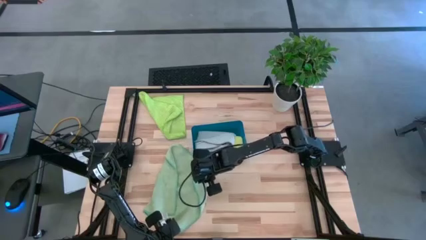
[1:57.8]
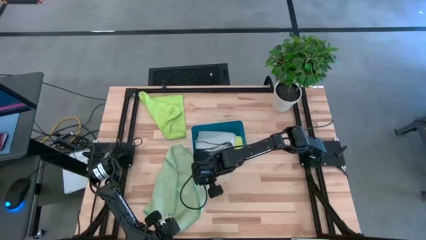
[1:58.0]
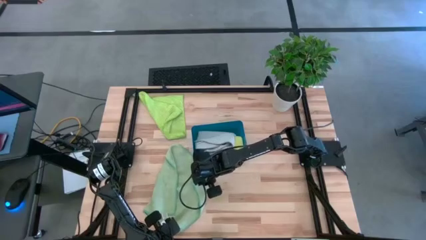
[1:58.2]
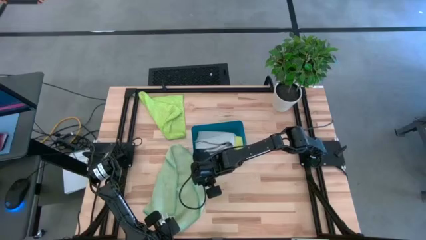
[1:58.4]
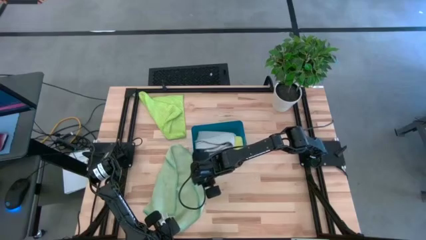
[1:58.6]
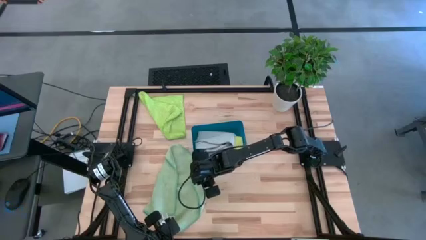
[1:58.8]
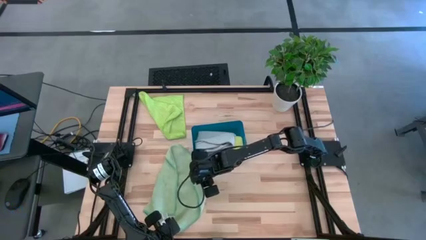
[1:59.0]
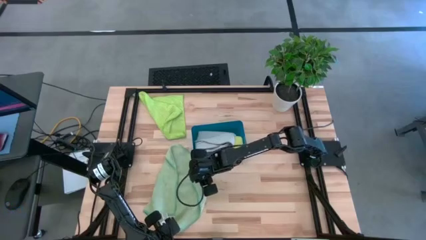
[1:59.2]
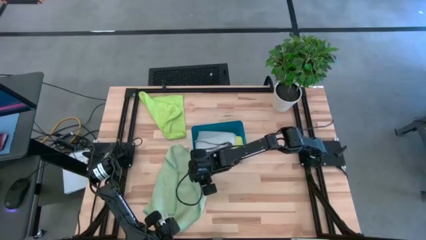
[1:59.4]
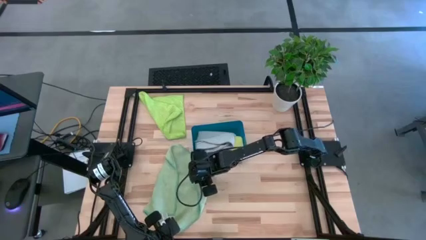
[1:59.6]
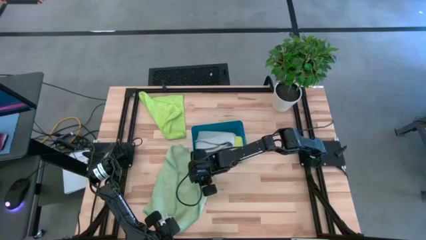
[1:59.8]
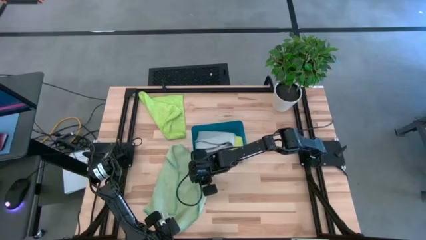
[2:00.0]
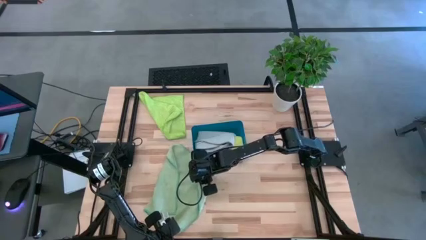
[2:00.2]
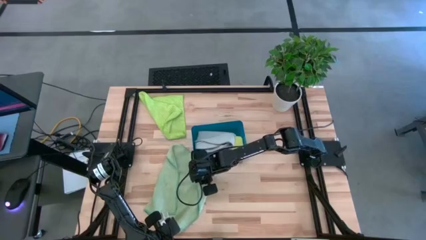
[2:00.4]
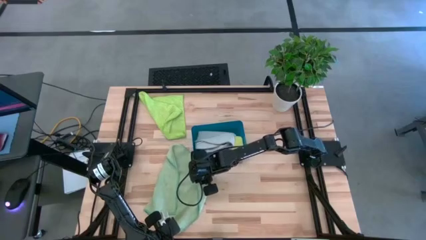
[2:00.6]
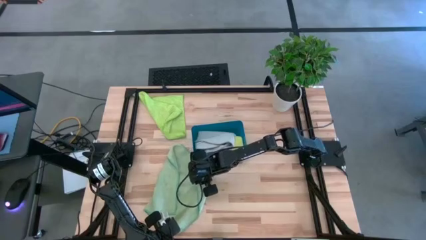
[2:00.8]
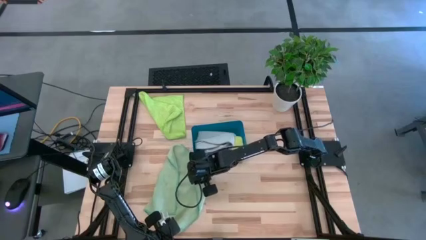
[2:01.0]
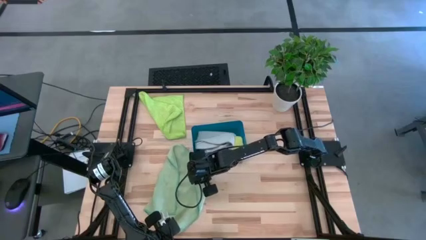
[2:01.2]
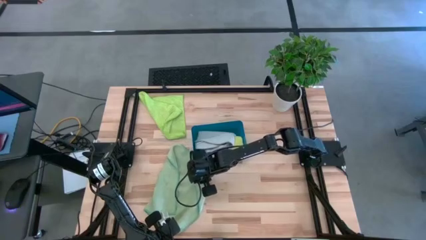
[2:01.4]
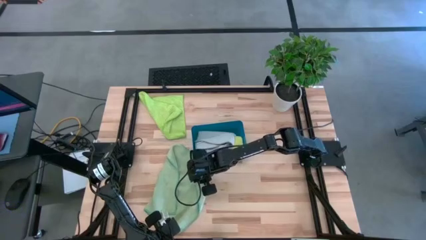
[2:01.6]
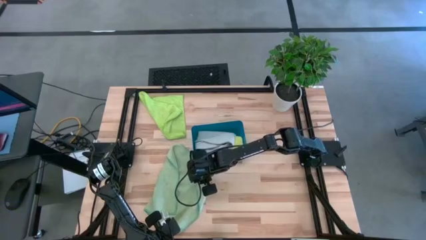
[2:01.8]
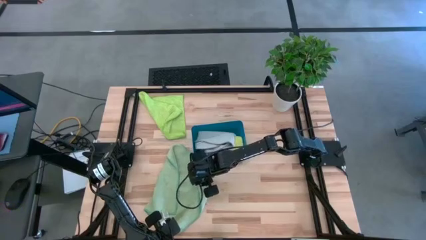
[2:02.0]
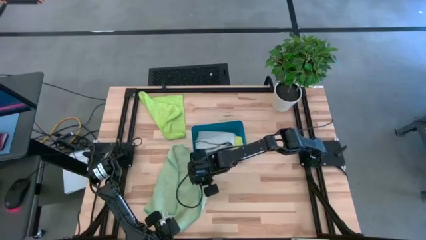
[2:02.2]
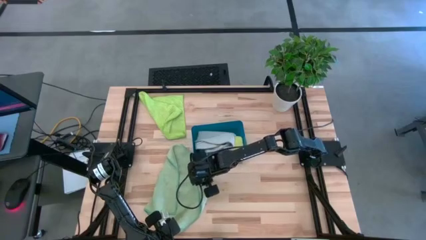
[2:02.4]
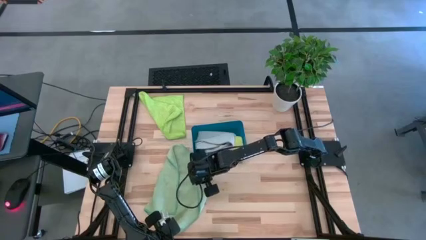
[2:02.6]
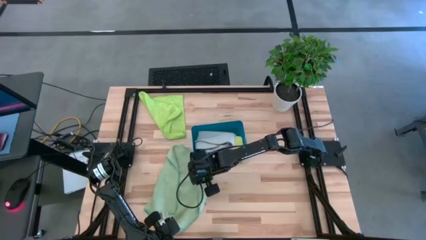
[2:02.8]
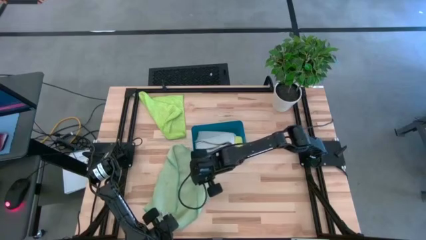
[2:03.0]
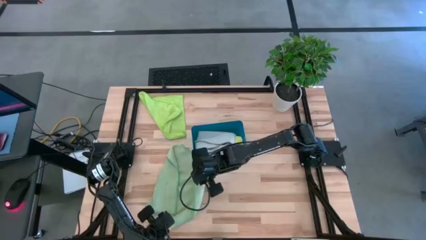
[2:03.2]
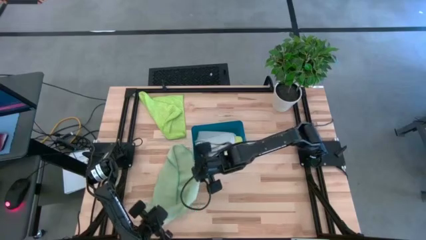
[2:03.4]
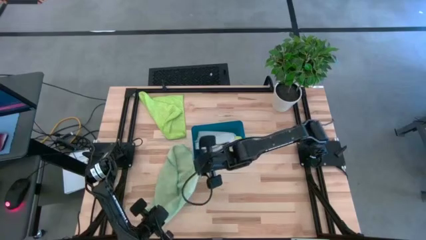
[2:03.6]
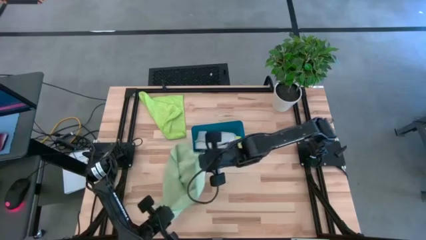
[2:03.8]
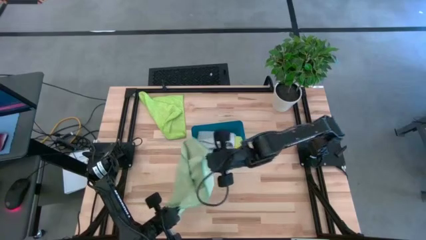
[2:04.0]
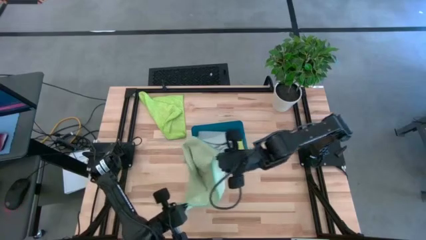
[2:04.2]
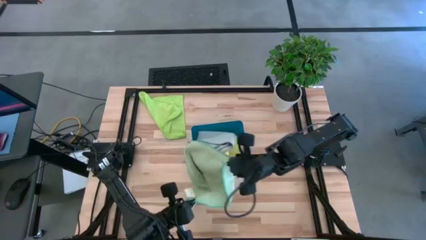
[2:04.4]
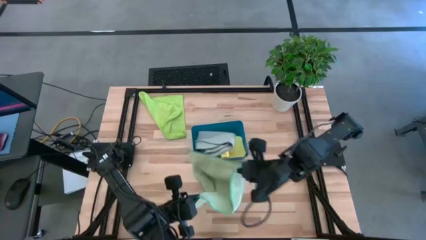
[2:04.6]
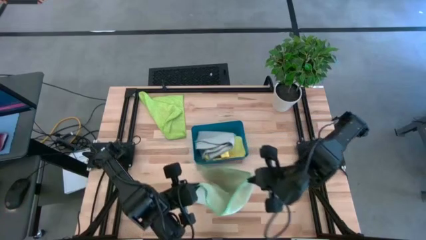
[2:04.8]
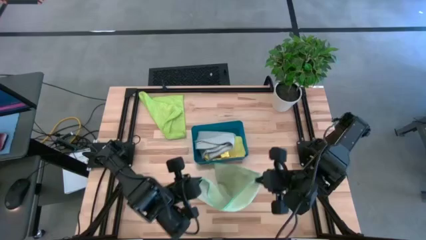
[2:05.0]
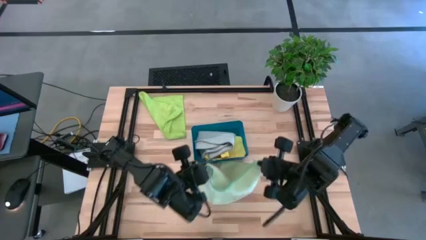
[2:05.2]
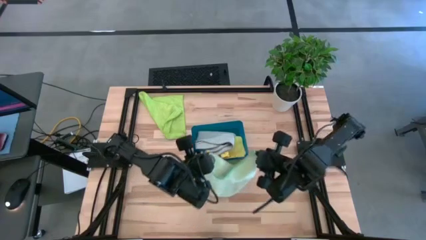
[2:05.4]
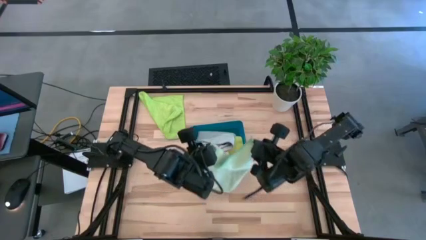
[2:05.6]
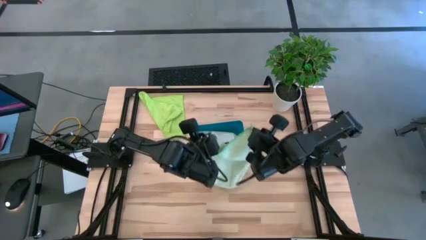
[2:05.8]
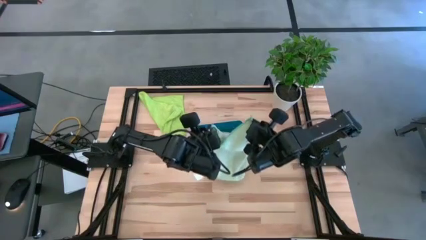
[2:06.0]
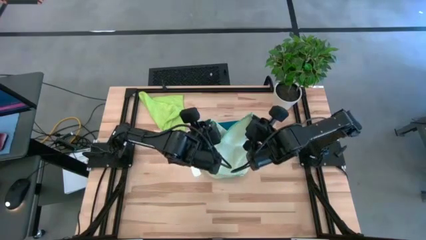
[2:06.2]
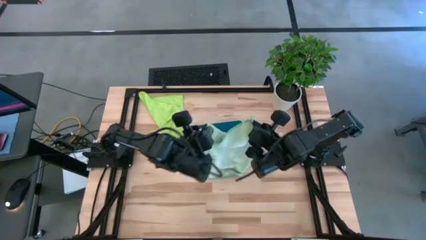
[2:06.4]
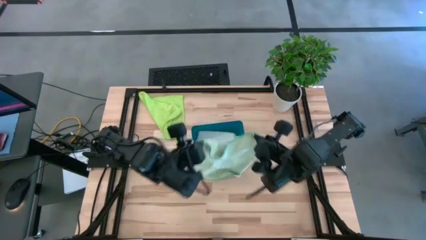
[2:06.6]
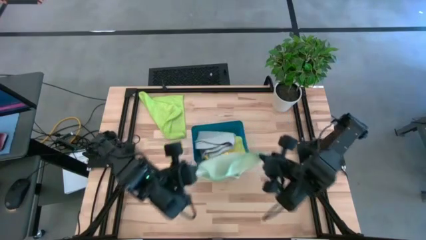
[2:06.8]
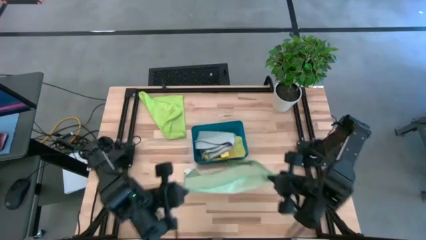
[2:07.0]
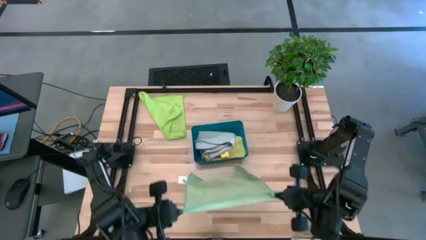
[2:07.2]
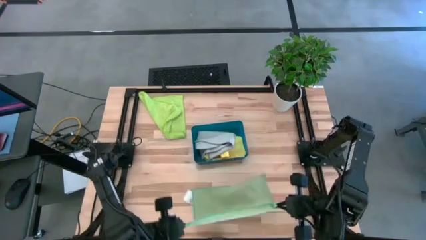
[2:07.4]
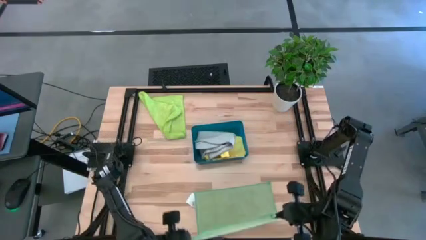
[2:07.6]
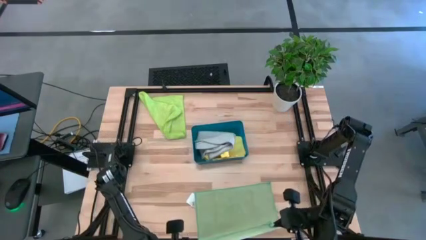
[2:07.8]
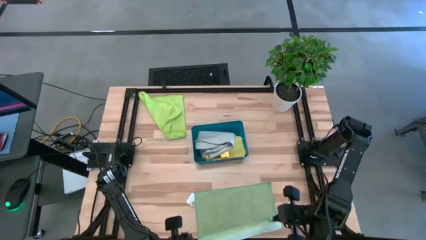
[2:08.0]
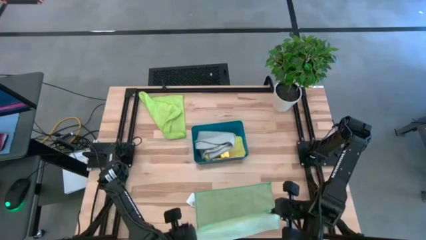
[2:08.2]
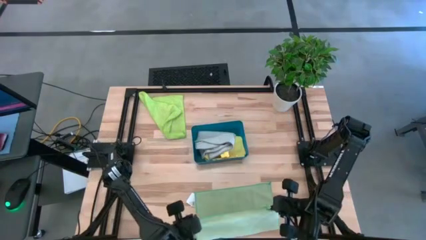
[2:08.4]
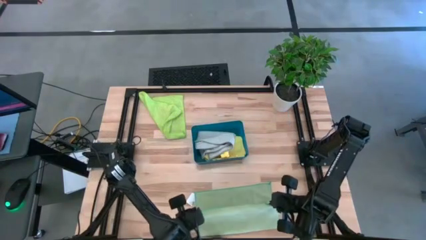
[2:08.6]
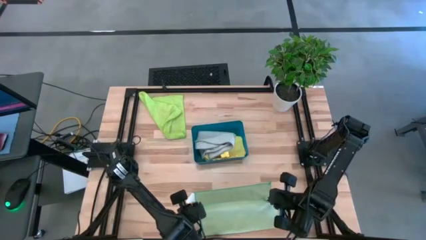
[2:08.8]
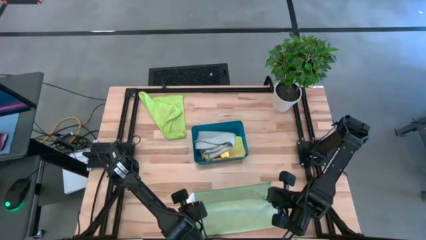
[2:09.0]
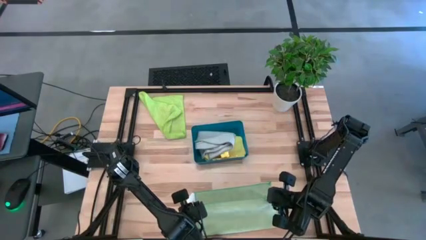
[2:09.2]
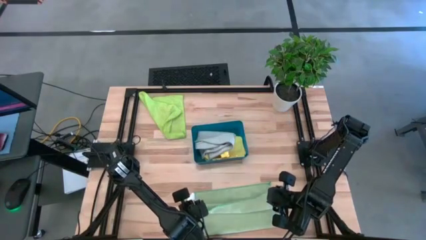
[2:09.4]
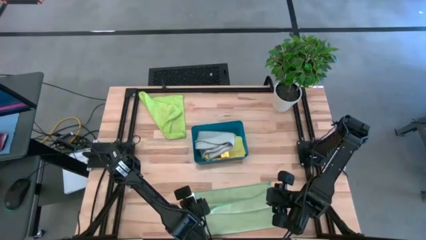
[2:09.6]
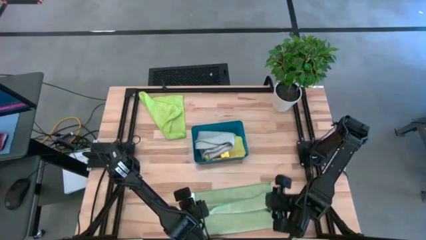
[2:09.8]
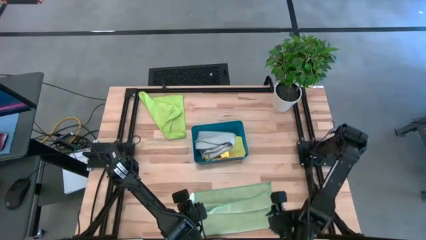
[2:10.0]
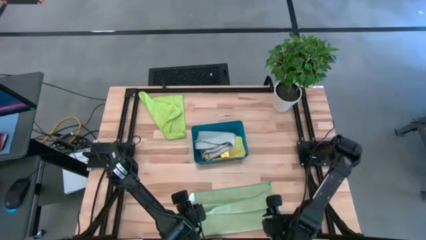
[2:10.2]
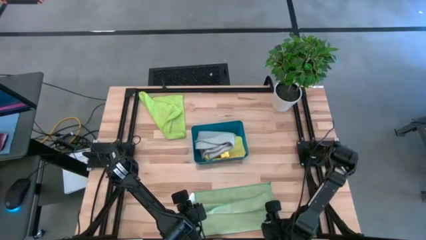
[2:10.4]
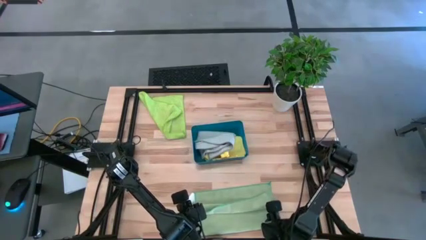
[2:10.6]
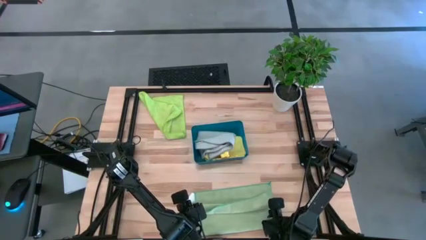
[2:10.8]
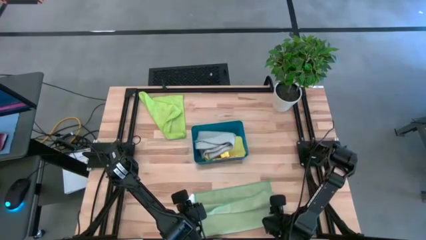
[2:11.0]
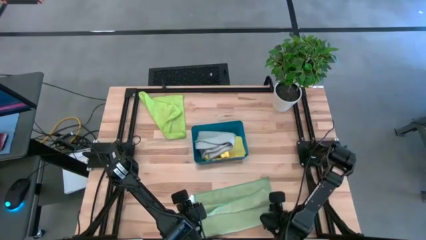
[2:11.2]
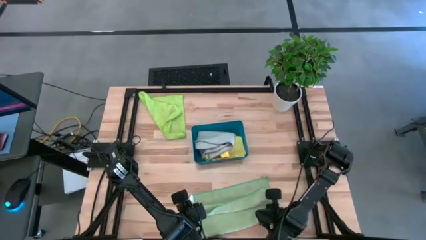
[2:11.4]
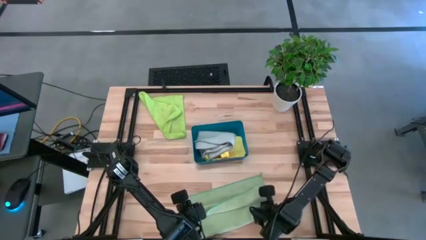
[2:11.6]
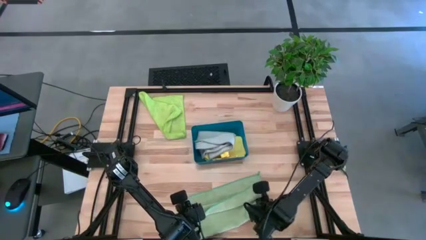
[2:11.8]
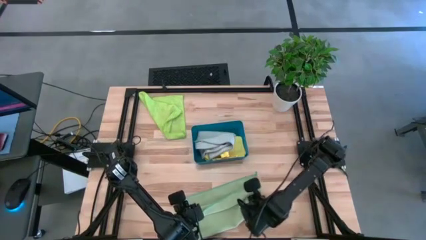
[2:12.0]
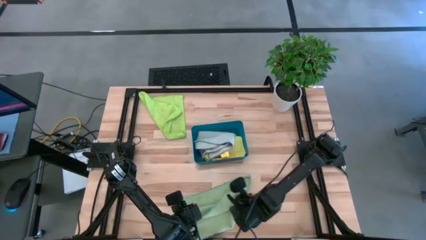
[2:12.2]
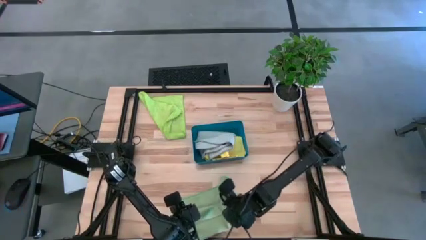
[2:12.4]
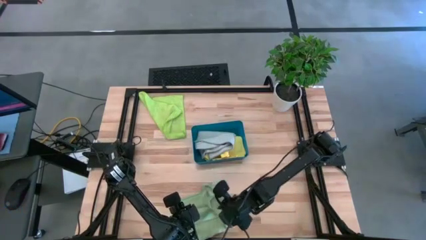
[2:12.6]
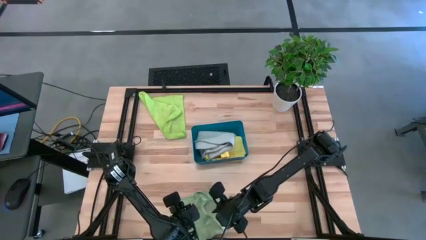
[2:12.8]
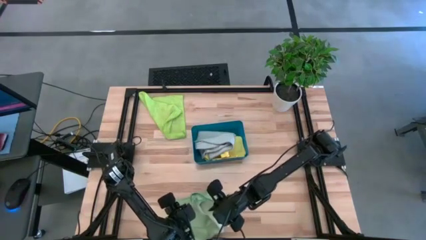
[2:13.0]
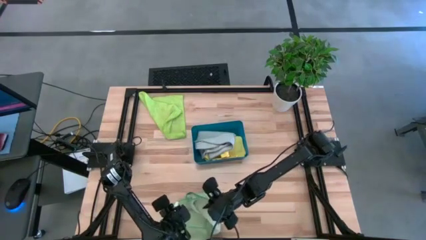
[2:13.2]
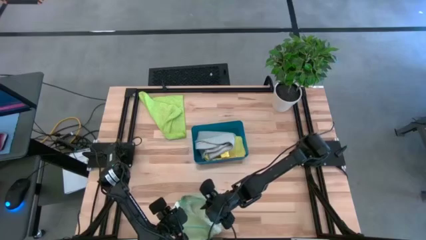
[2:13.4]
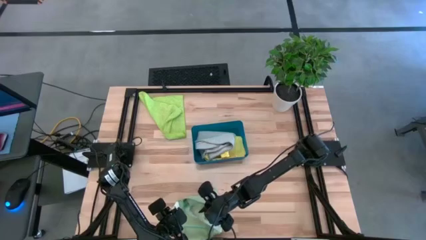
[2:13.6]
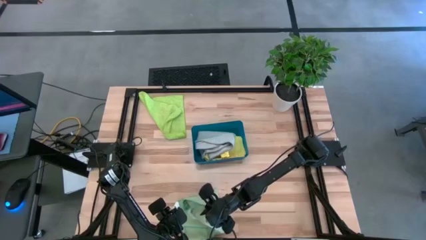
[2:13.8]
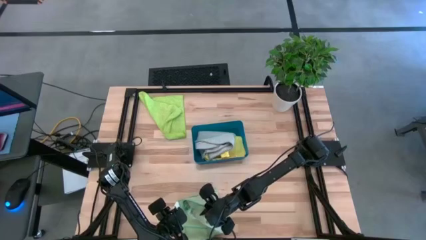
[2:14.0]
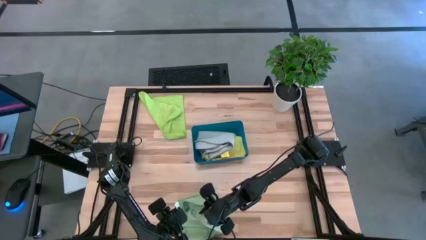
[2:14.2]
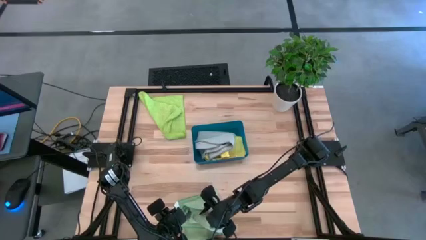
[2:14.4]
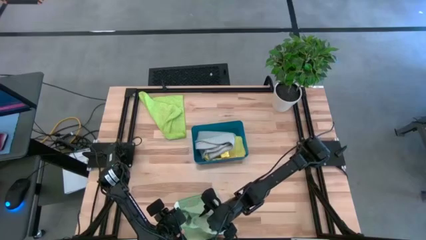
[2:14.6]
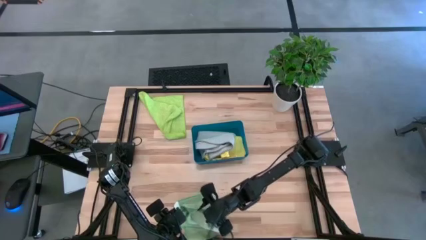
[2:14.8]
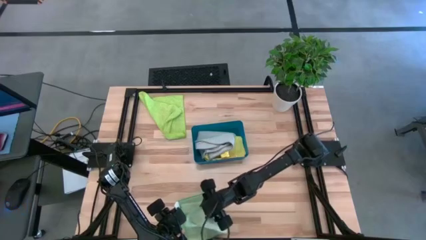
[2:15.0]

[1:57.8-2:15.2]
Task: Fold microfiber towels
Fold the light green microfiber towel
